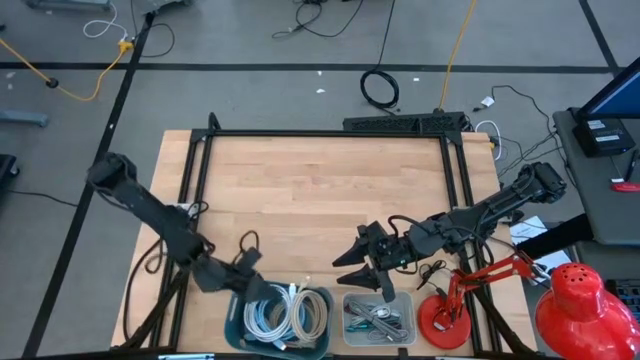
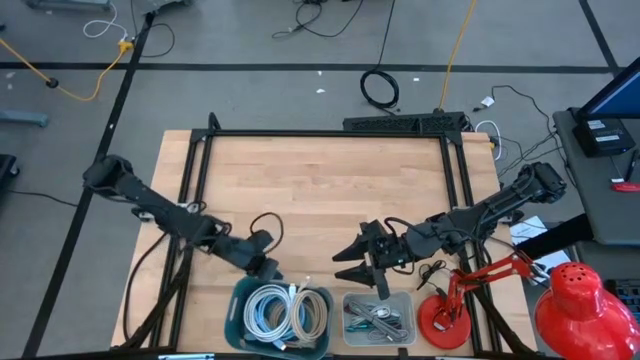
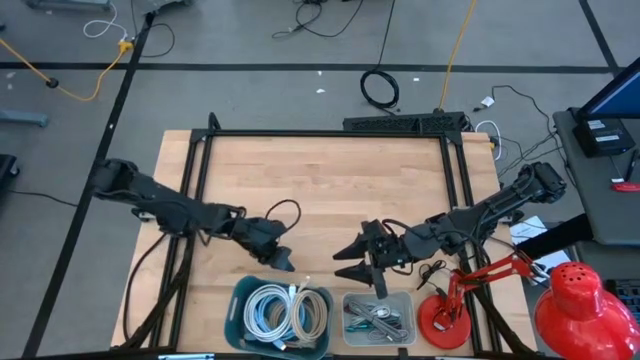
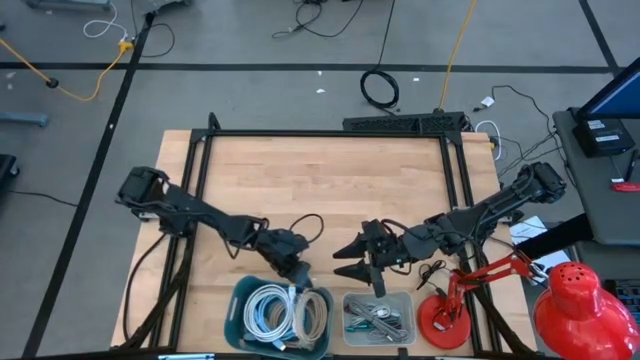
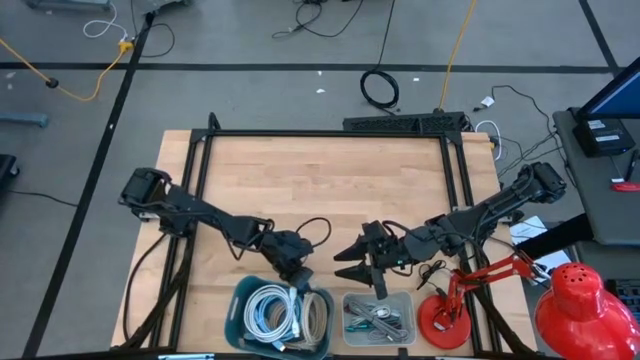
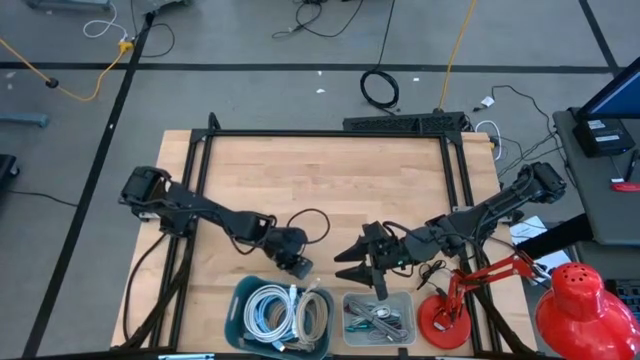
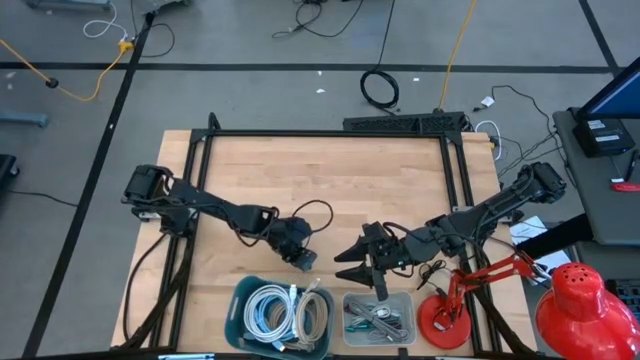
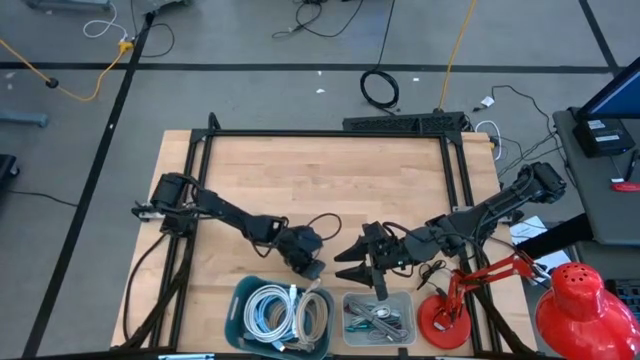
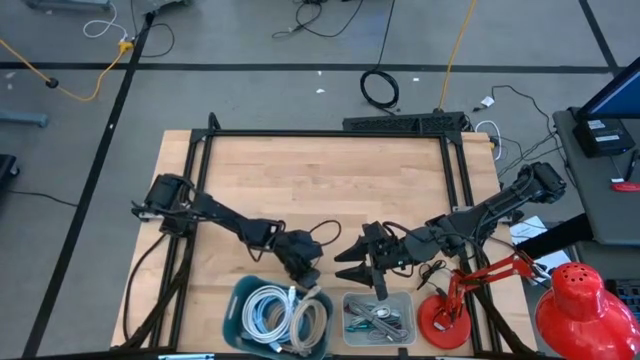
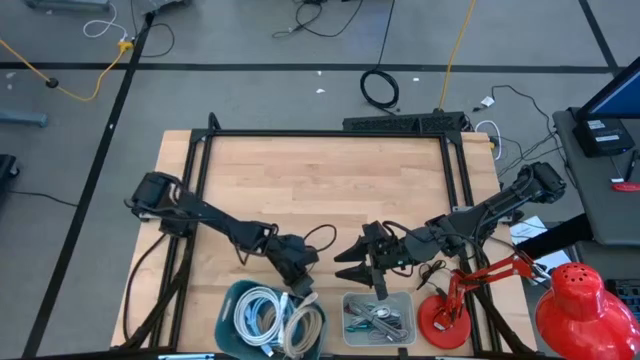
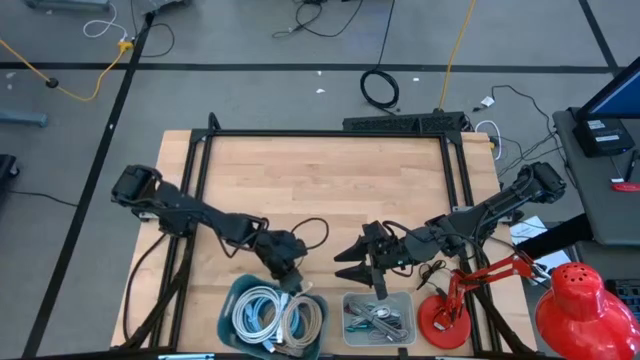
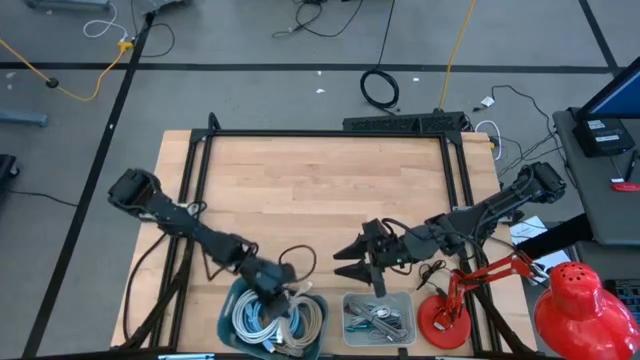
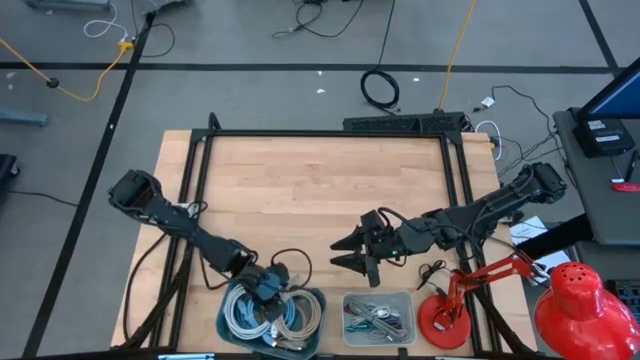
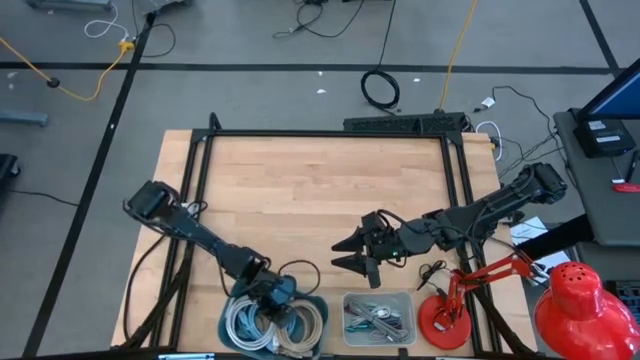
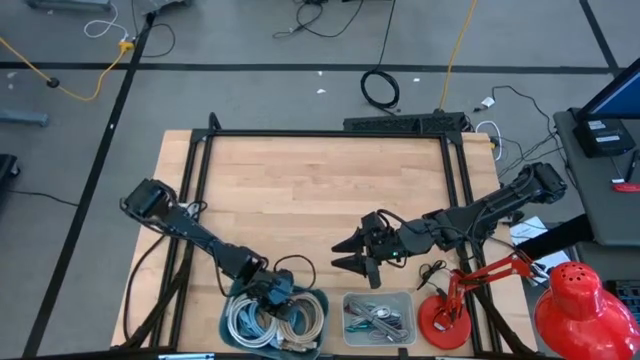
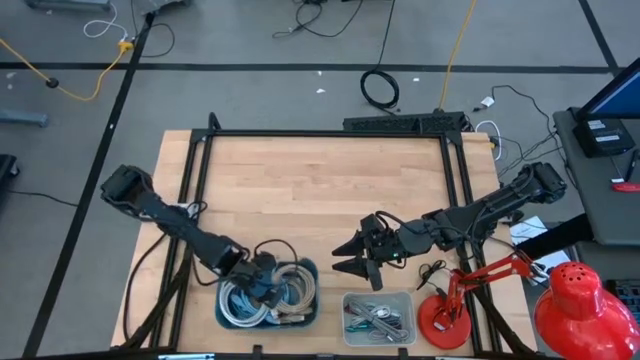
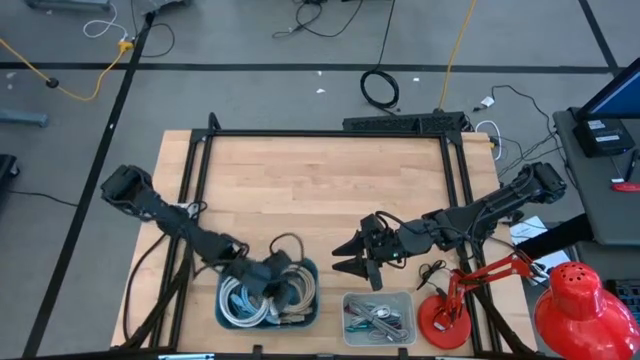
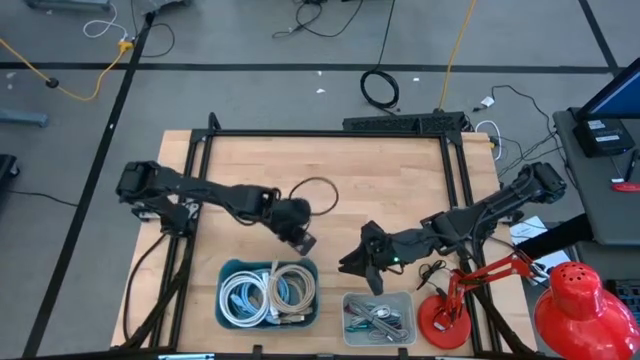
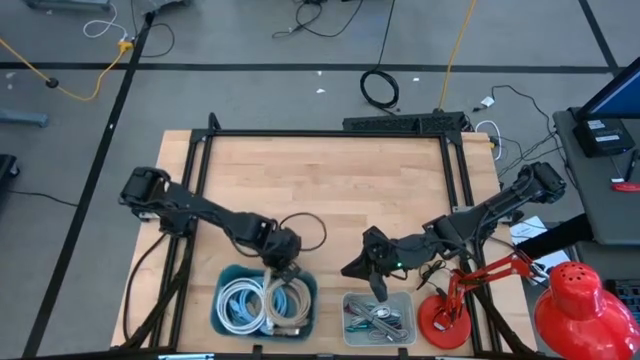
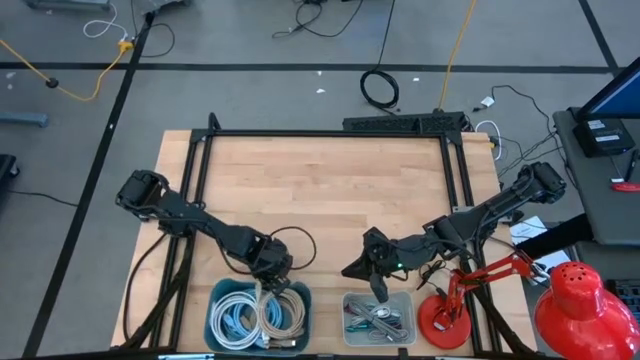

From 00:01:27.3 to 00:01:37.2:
Task: Pick & Place USB Port
Adjust the dark blue bin on the table

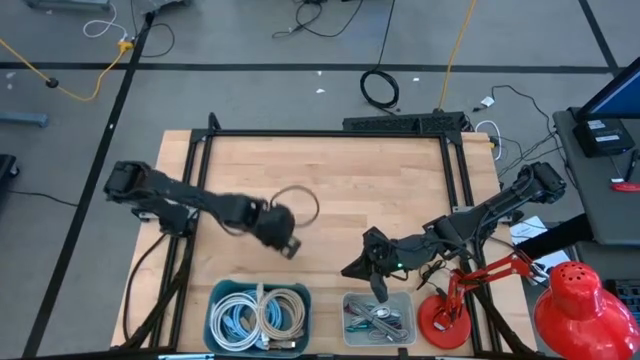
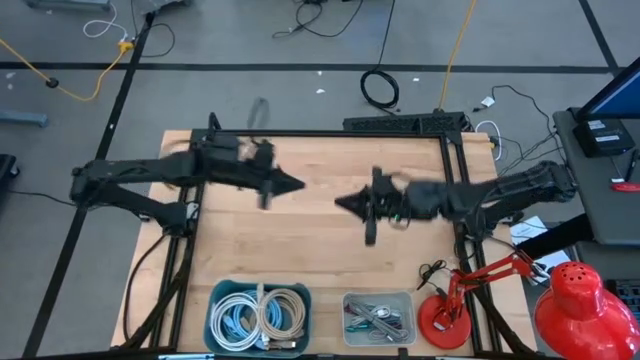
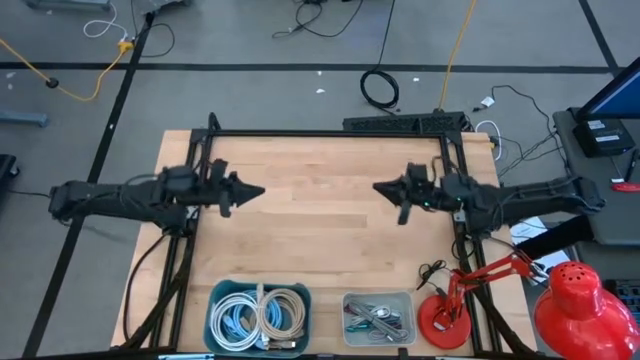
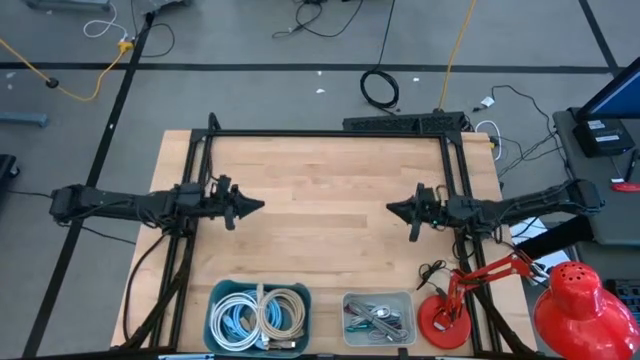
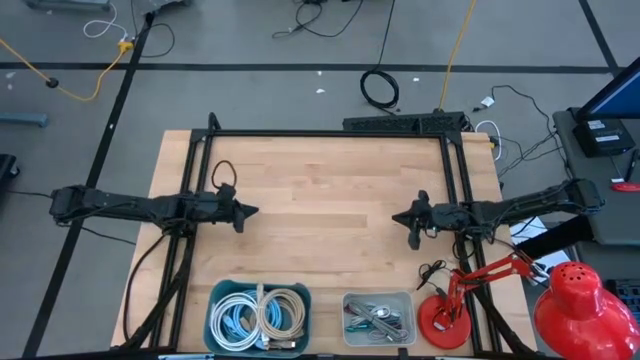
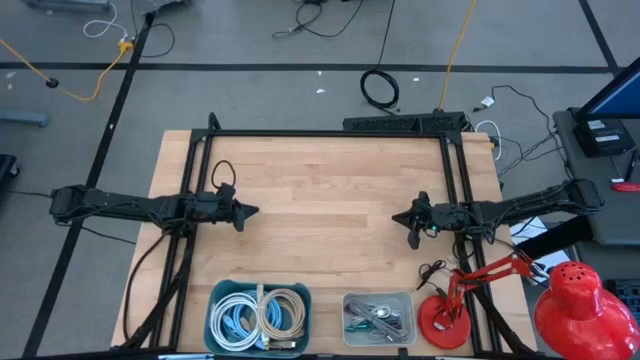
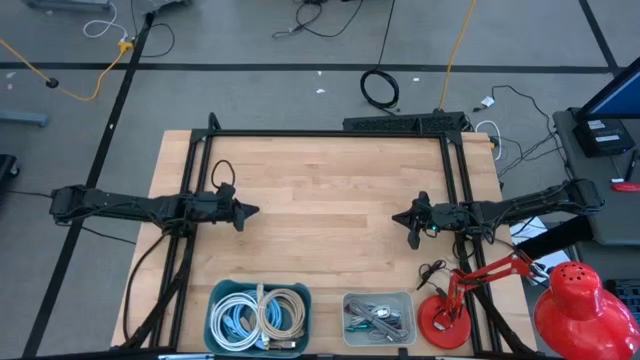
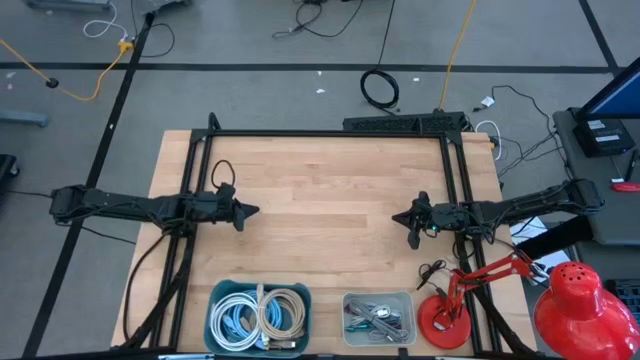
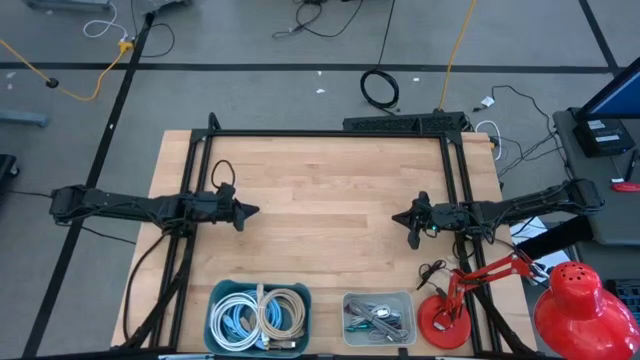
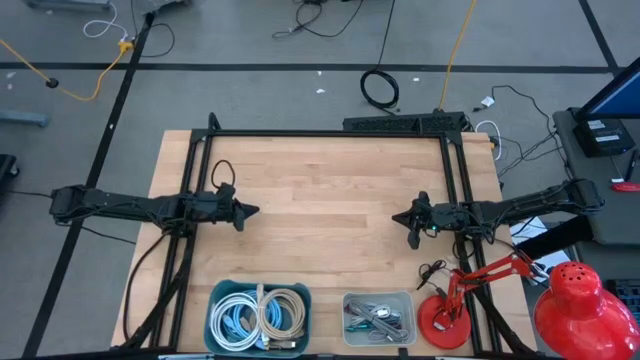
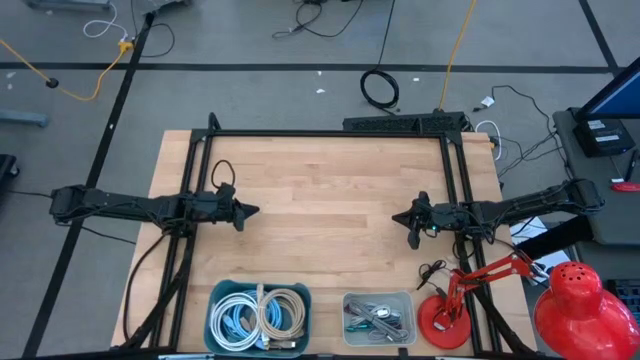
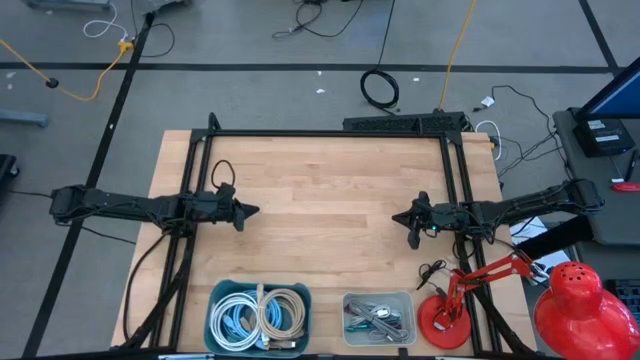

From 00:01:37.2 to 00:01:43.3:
Return to Home Position

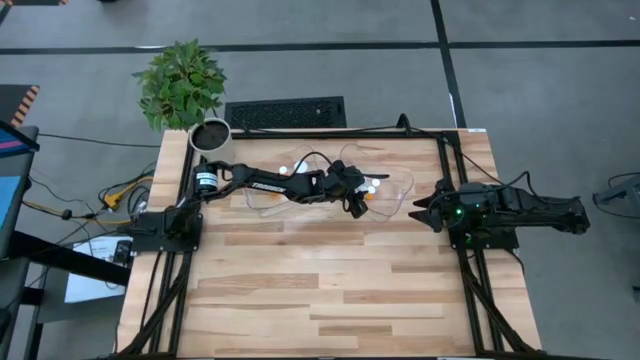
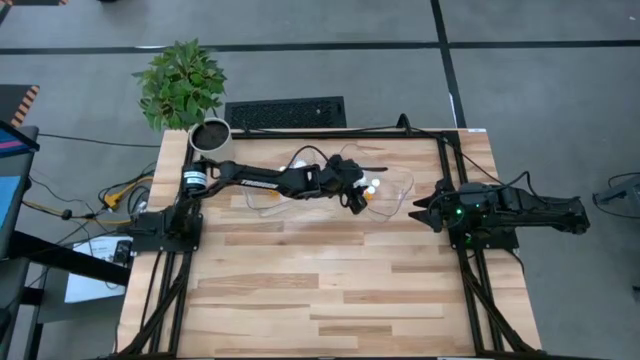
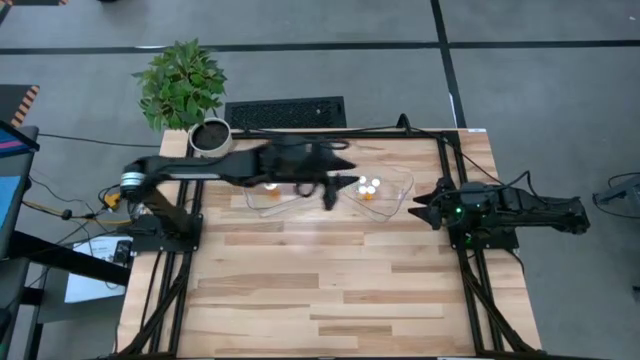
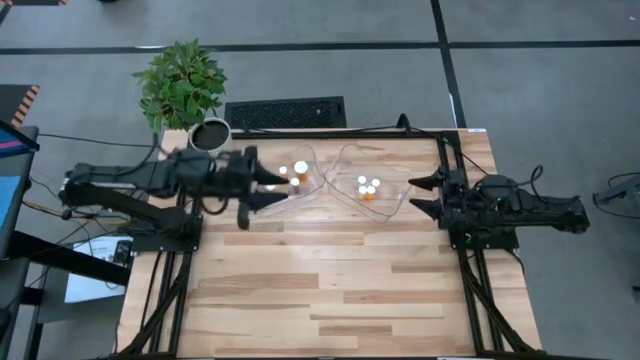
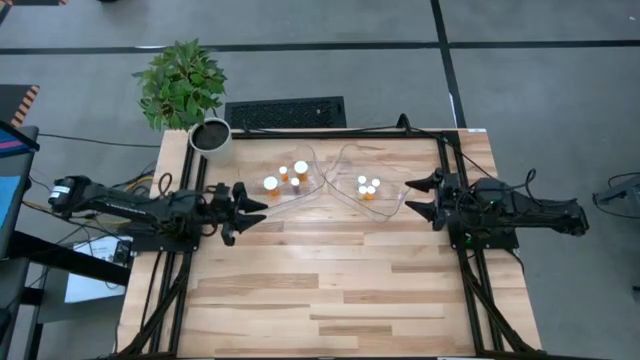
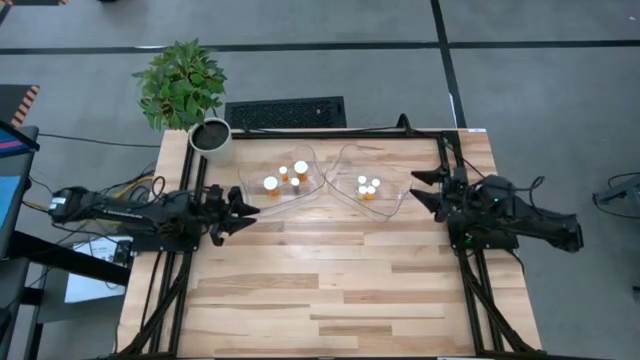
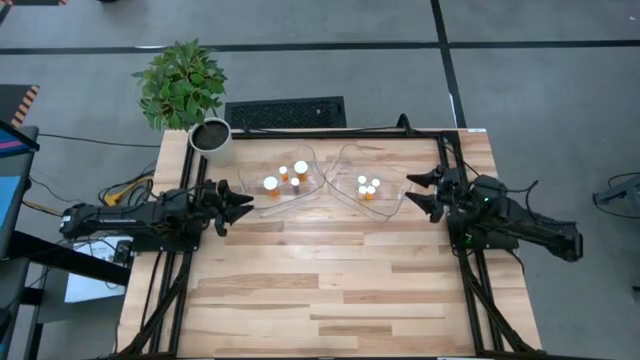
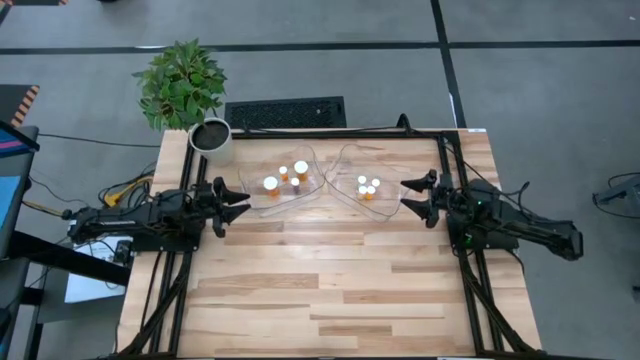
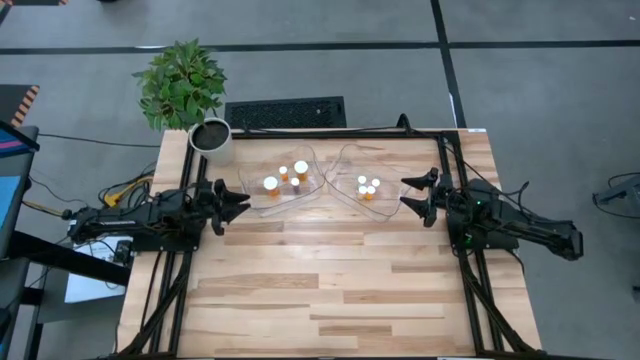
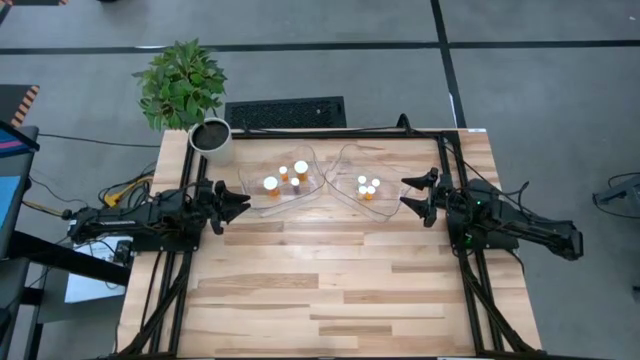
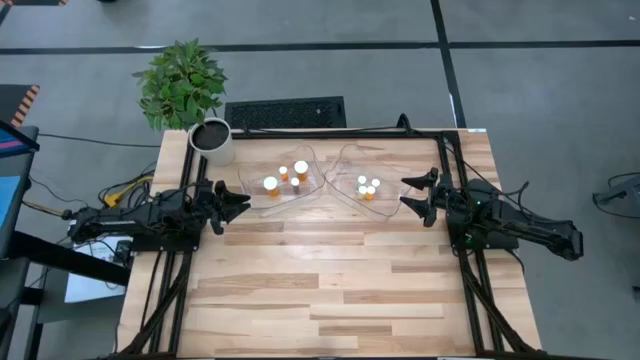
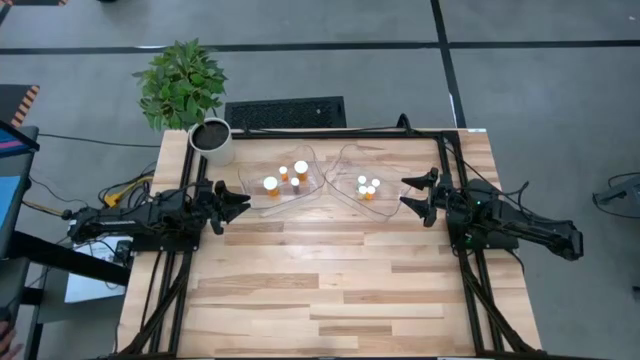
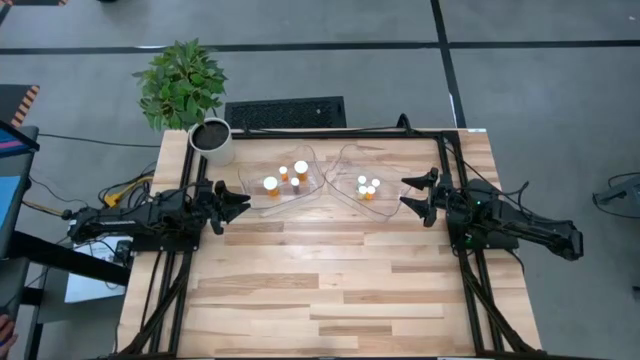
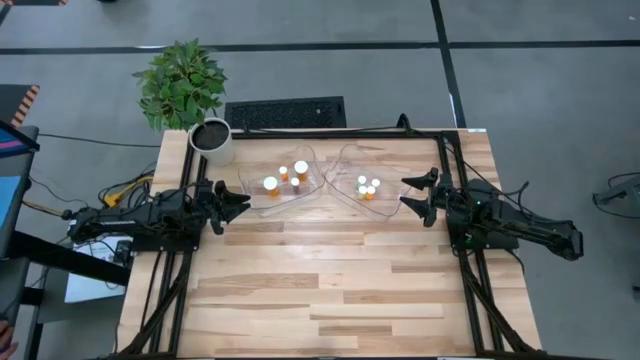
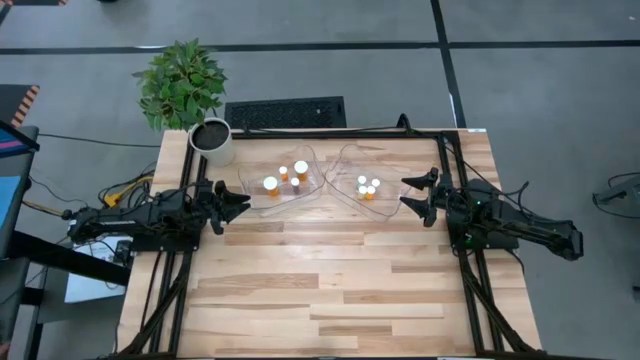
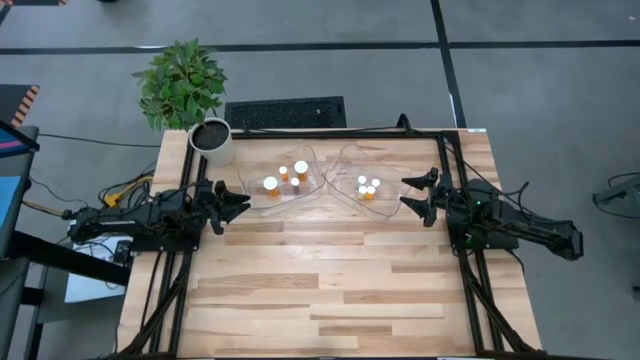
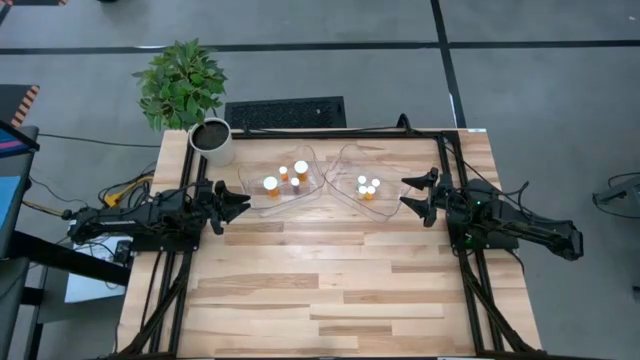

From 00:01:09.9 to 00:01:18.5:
Task: Pick and place medicine bottles into bin by pill shape (circle, oval)
Return to Home Position
